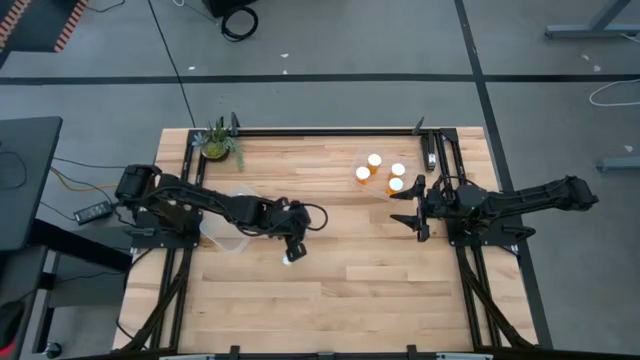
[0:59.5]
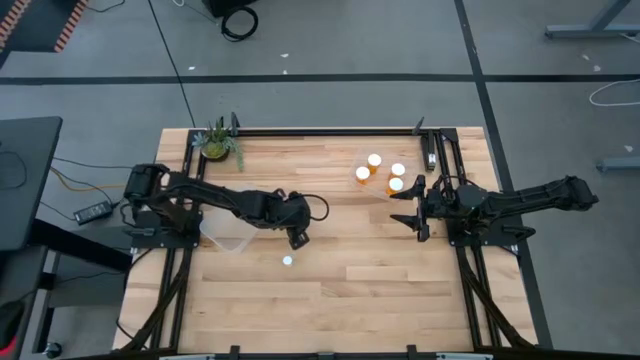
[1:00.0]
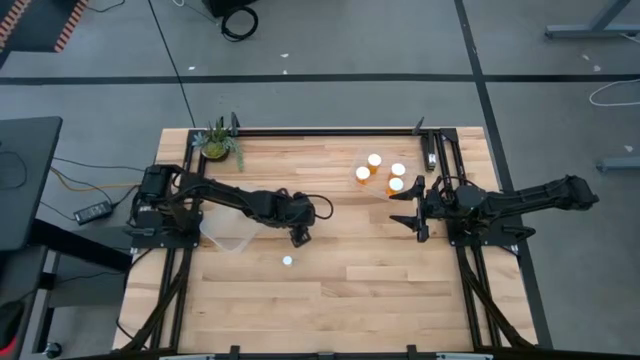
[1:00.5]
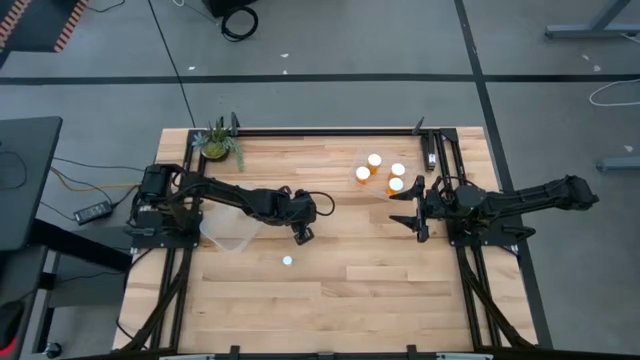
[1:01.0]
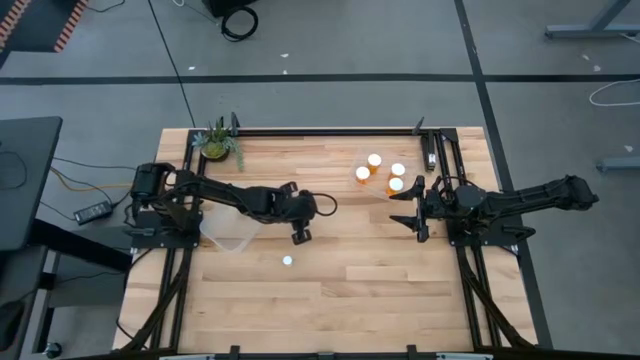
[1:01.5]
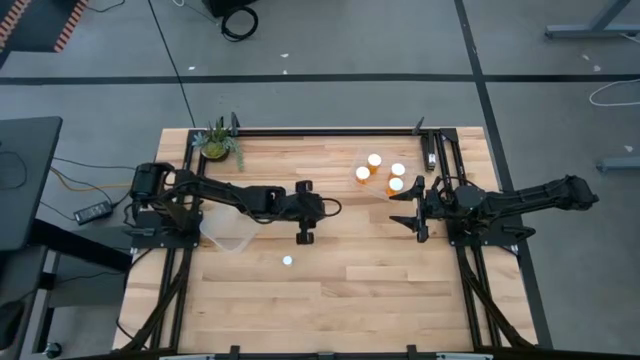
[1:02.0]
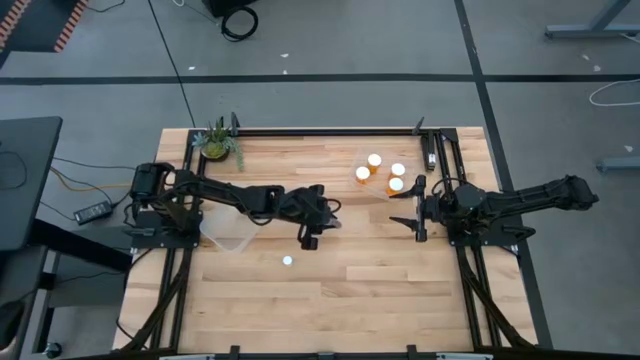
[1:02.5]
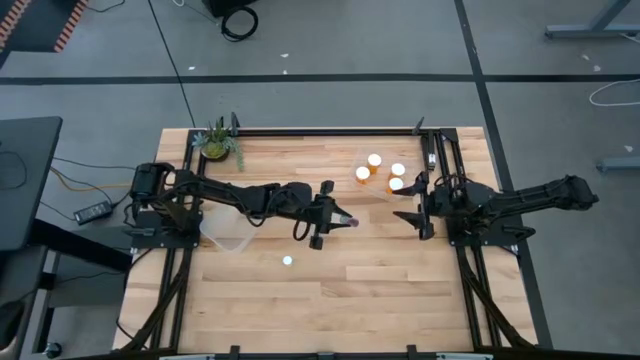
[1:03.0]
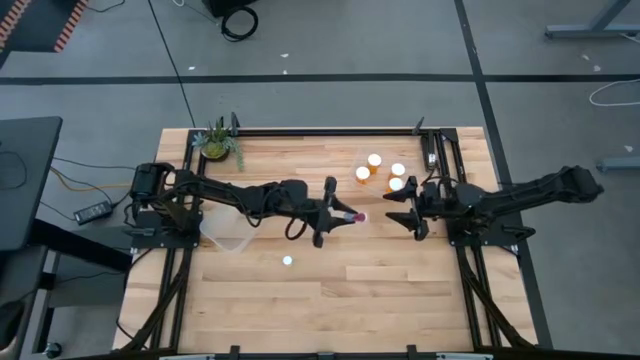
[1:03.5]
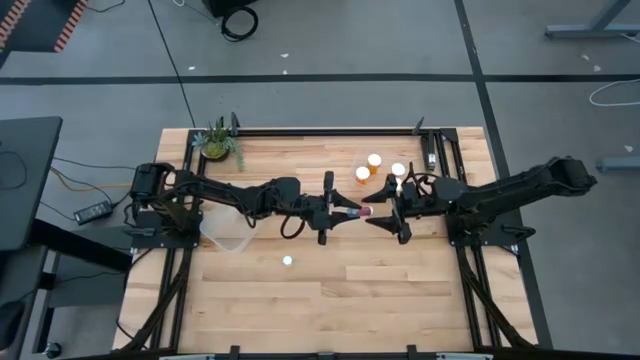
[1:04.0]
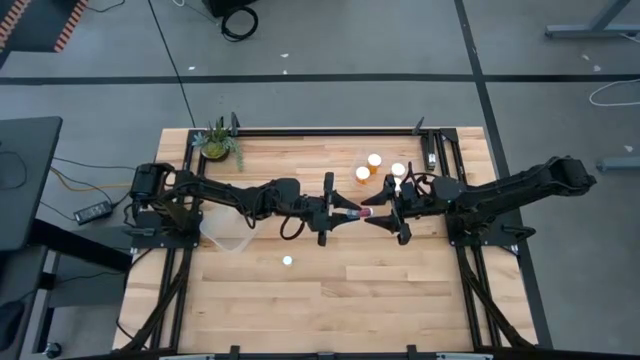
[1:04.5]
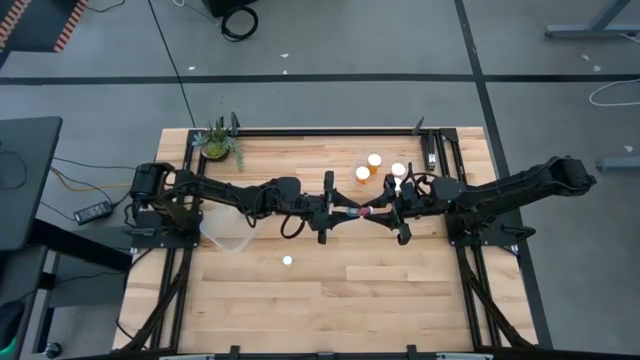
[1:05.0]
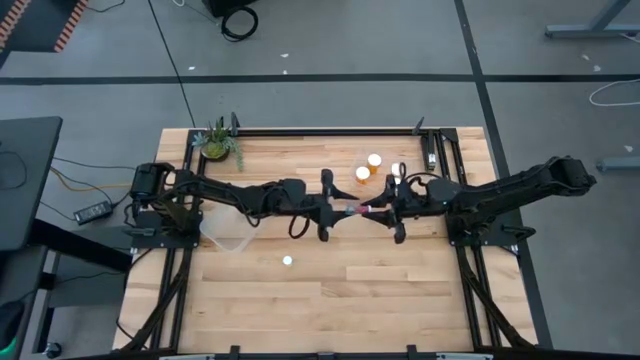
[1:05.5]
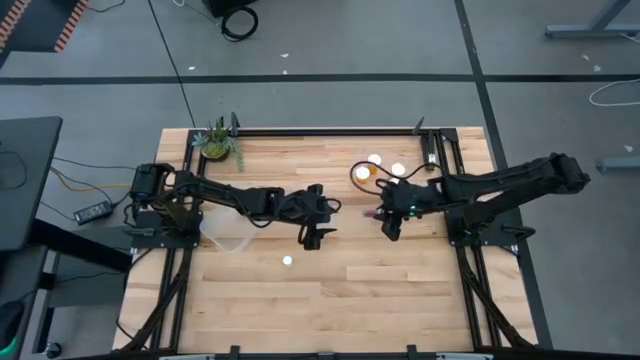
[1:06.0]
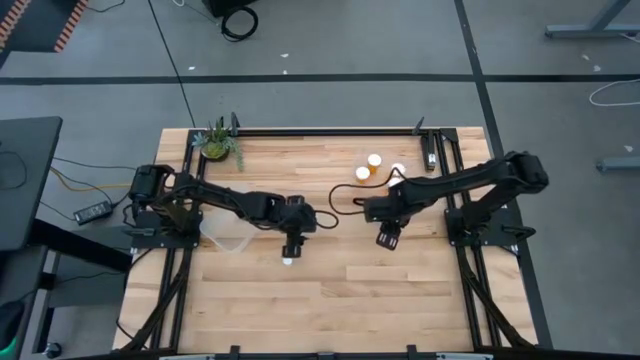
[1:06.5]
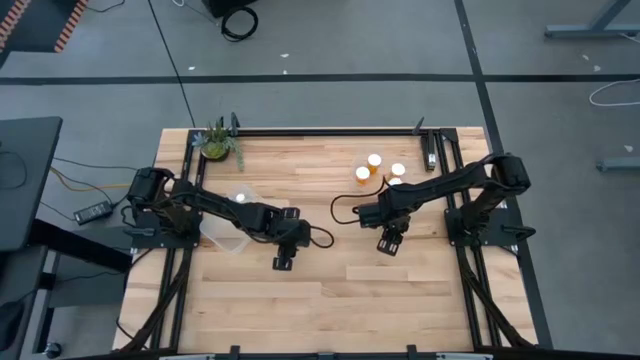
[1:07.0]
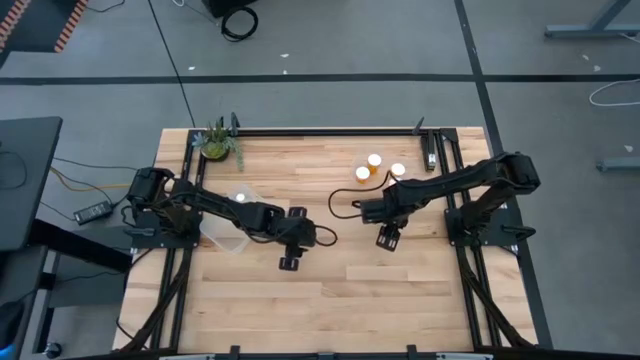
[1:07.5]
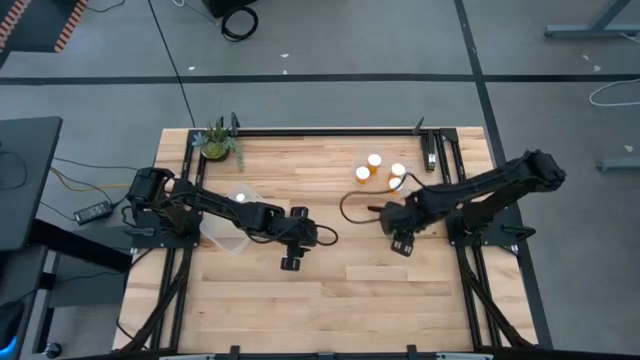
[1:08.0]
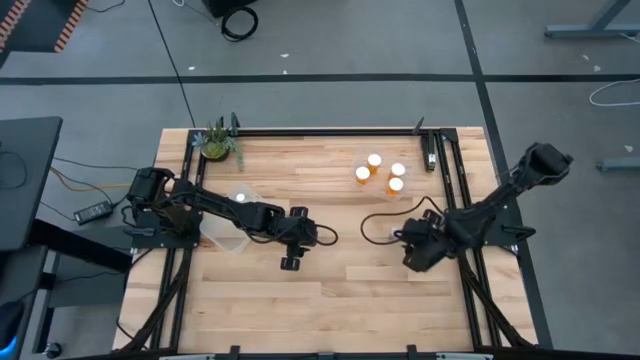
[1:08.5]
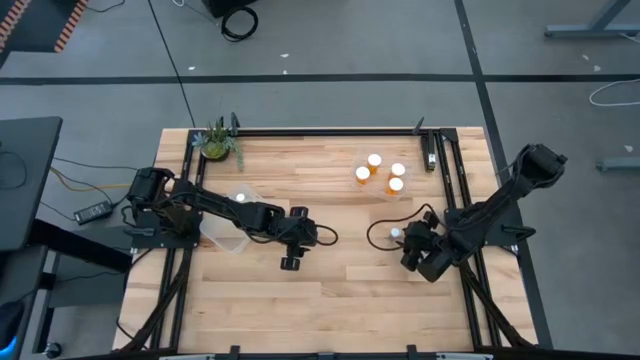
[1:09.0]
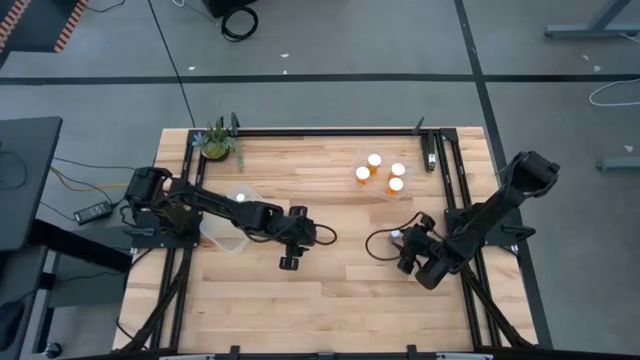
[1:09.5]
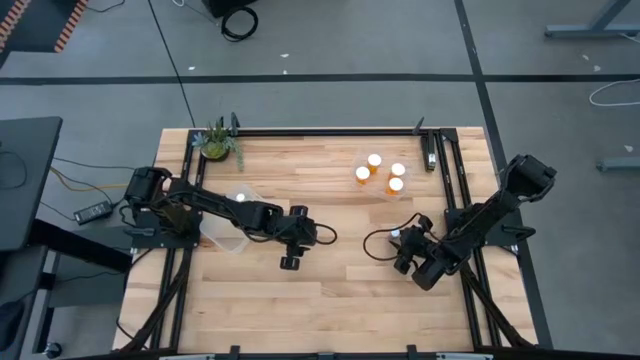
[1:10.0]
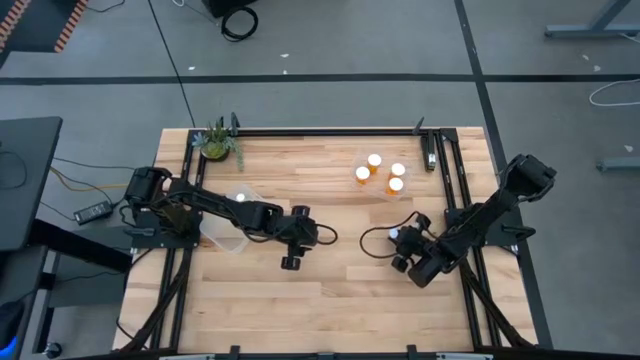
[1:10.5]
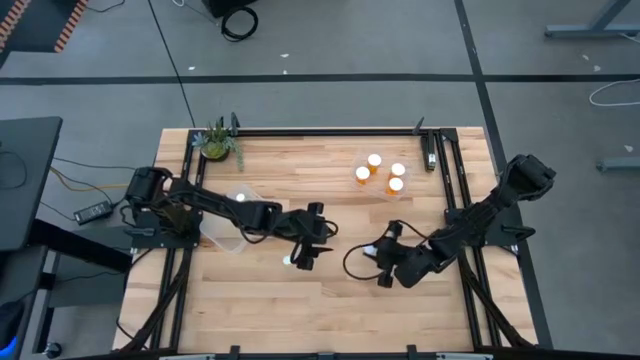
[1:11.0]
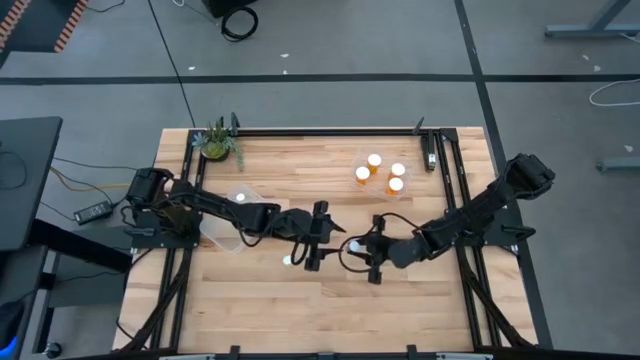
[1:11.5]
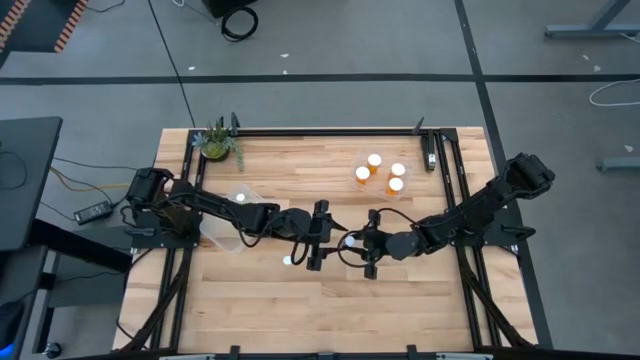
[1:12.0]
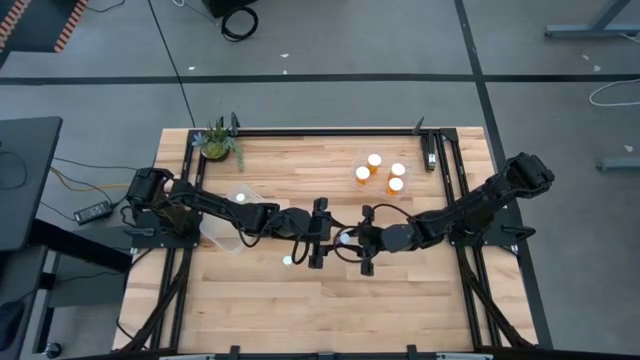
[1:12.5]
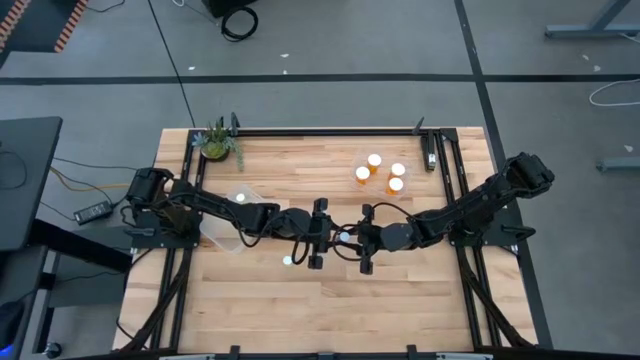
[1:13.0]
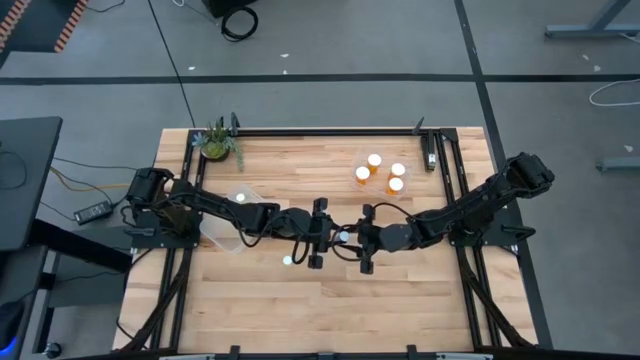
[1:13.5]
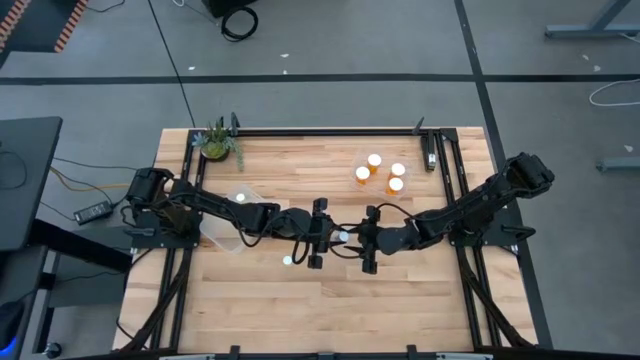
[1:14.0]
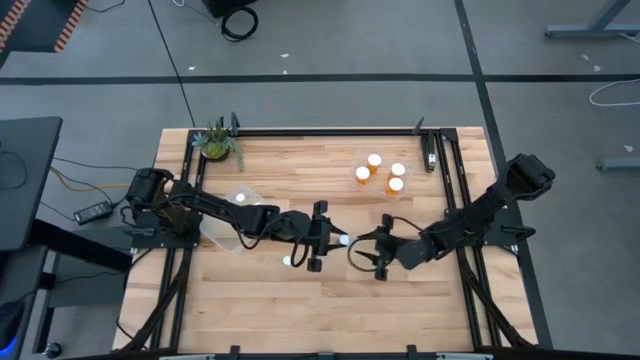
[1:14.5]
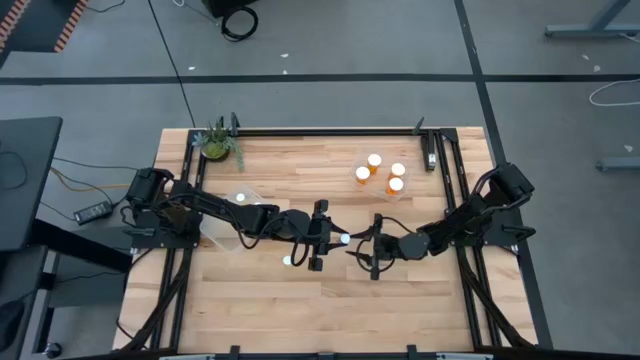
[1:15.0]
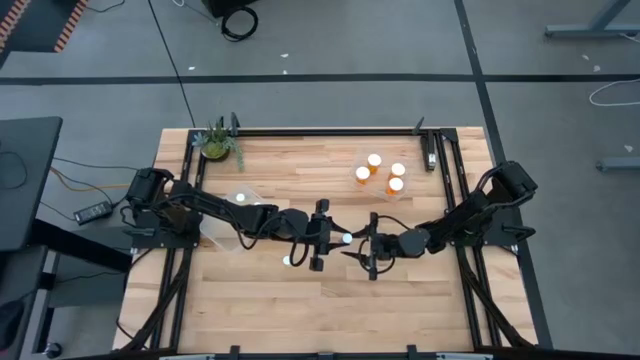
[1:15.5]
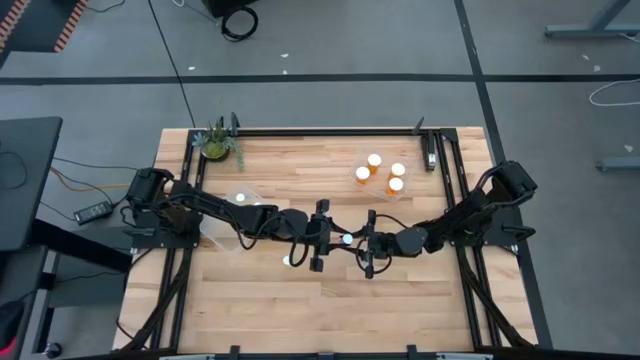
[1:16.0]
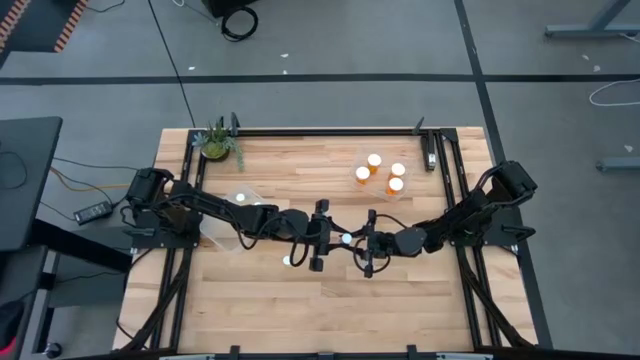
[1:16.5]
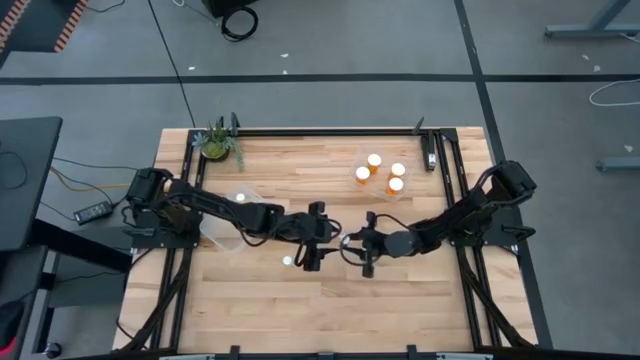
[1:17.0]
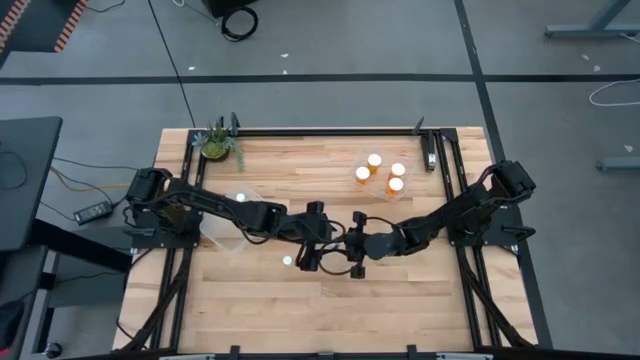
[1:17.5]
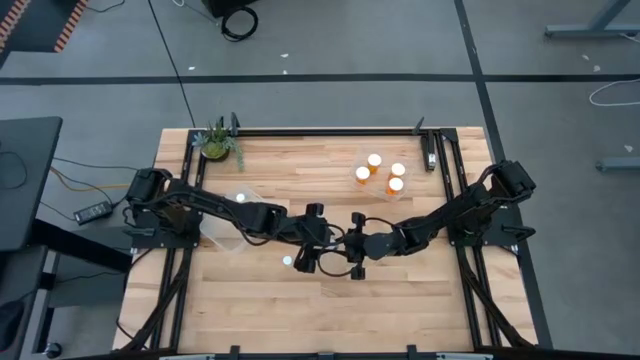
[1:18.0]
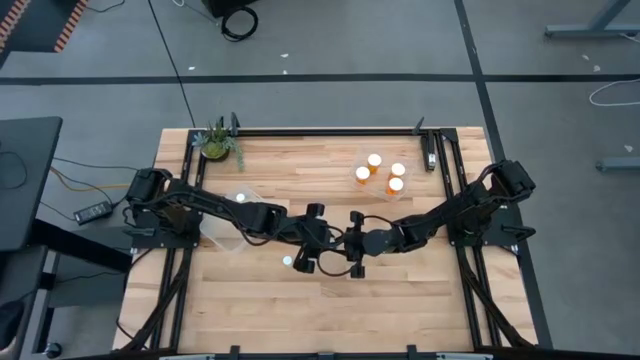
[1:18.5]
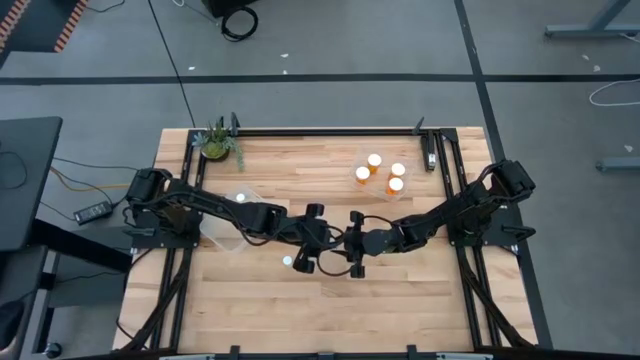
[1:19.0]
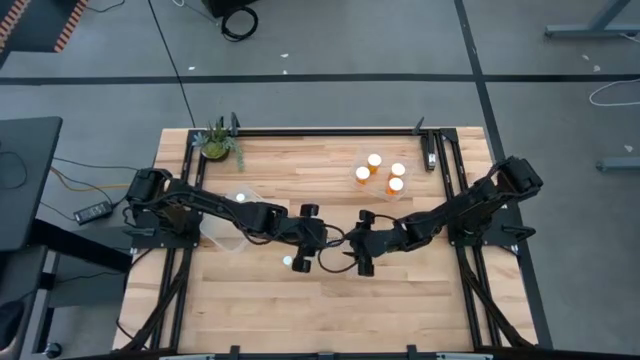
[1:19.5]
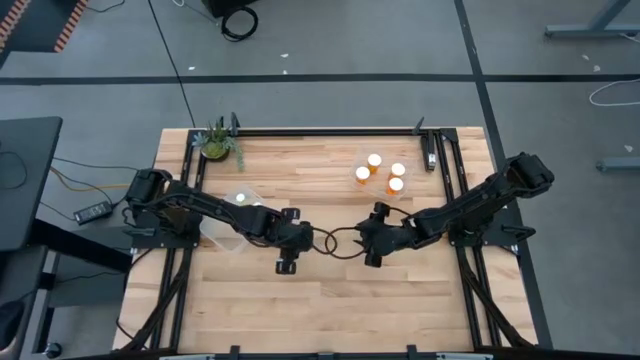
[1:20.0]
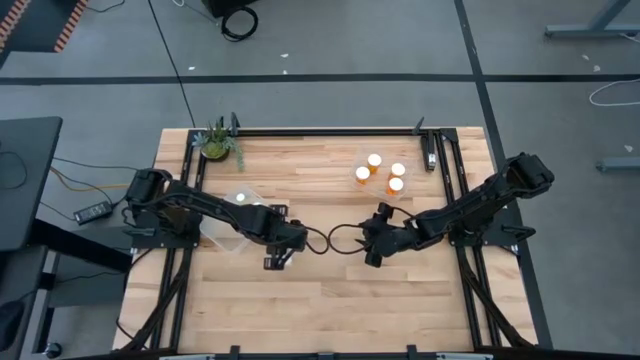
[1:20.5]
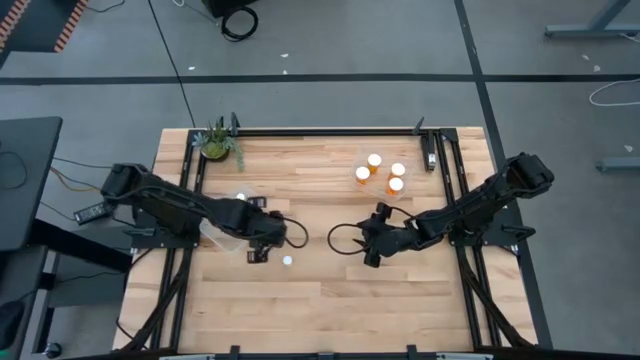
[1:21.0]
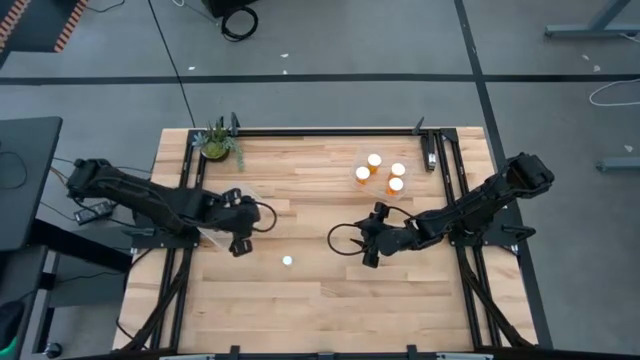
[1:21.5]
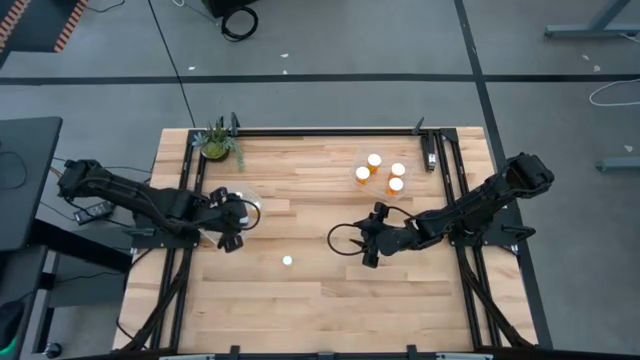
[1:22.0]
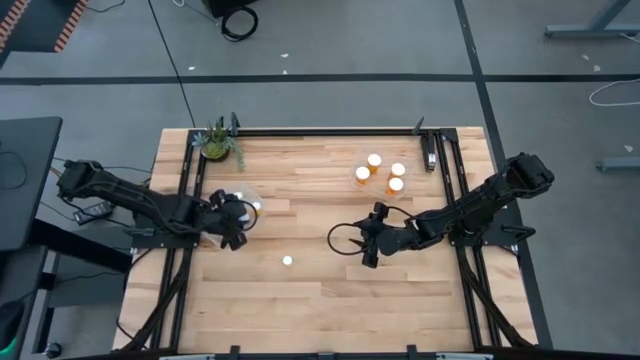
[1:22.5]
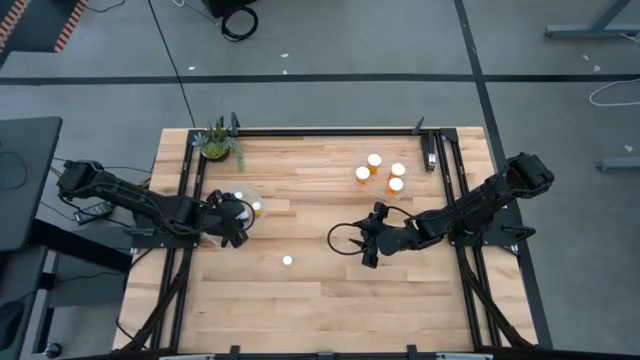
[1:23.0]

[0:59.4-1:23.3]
Task: Pick and place medicine bottles into bin by pill shape (circle, oval)
Put the small blue pill bottle into the left transparent bin
